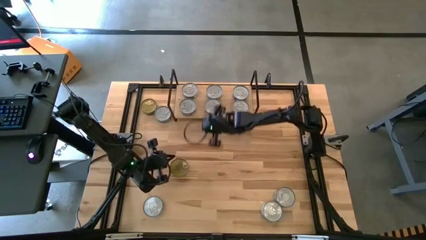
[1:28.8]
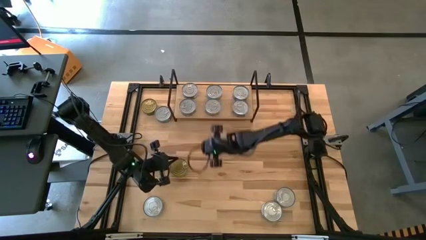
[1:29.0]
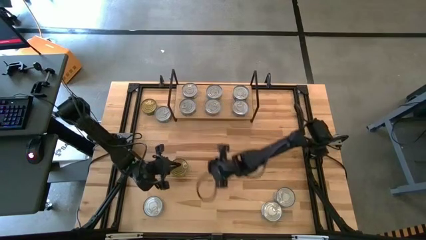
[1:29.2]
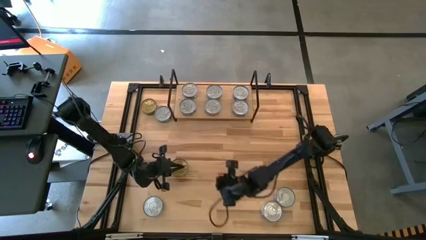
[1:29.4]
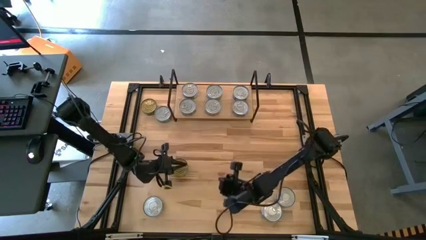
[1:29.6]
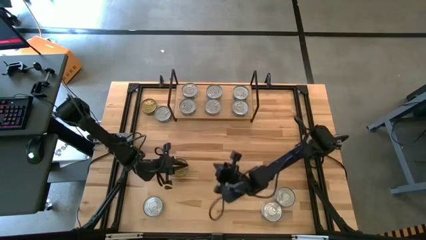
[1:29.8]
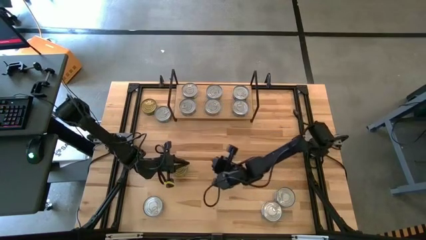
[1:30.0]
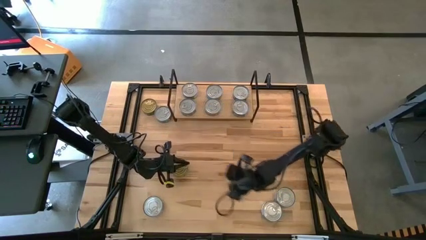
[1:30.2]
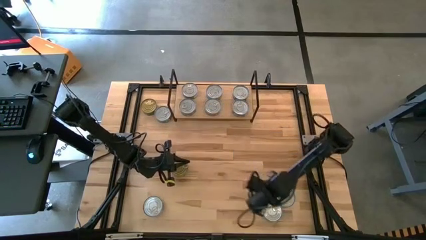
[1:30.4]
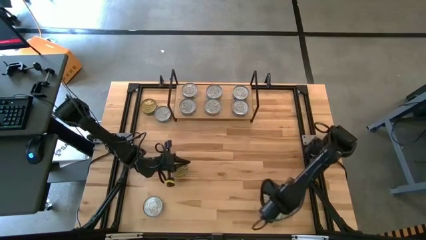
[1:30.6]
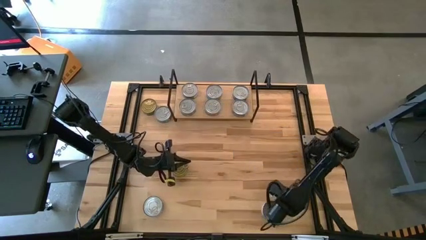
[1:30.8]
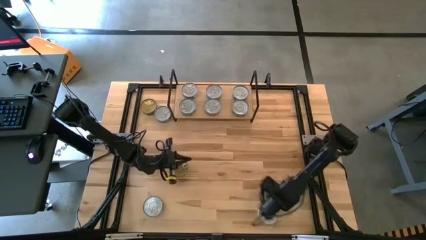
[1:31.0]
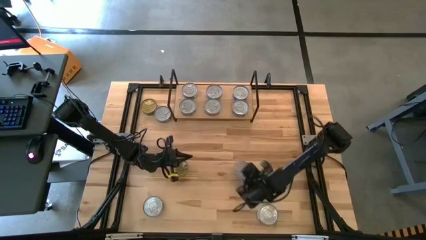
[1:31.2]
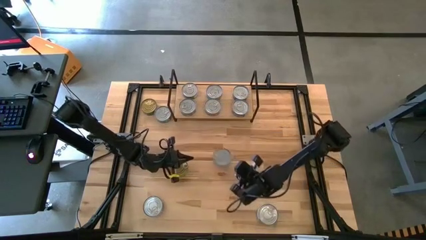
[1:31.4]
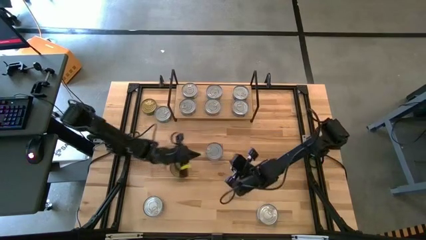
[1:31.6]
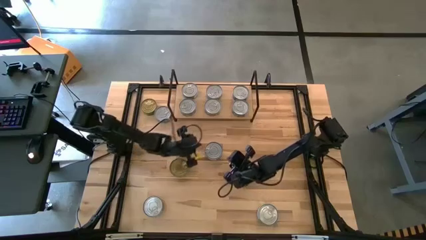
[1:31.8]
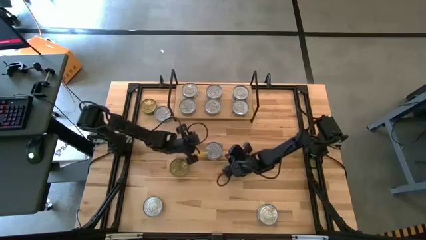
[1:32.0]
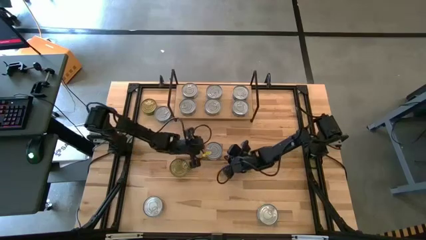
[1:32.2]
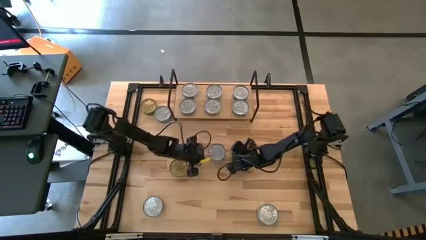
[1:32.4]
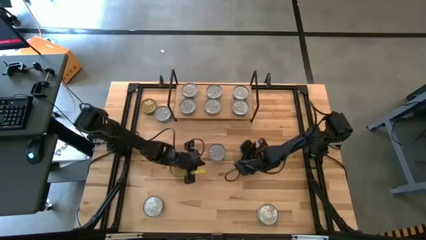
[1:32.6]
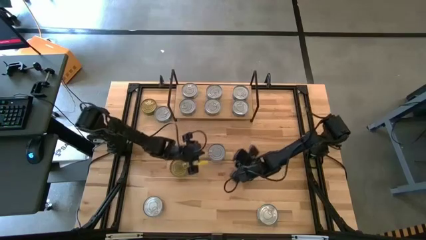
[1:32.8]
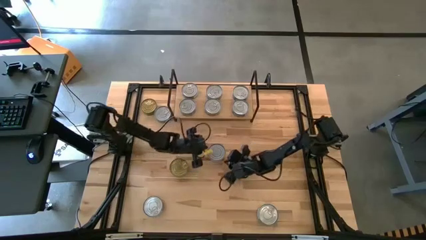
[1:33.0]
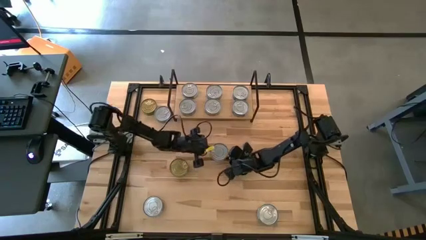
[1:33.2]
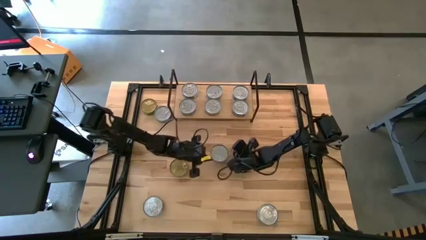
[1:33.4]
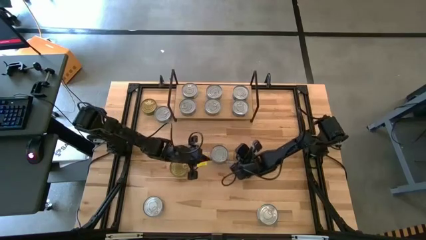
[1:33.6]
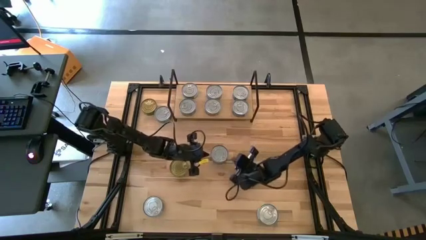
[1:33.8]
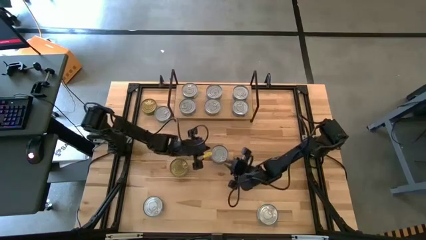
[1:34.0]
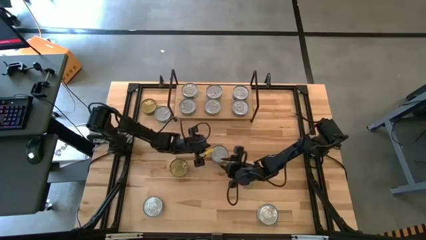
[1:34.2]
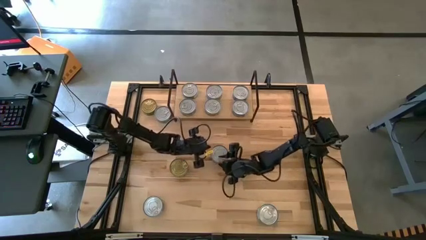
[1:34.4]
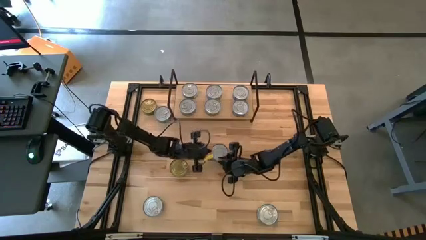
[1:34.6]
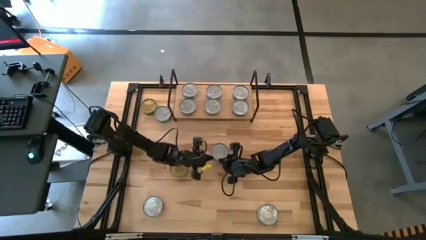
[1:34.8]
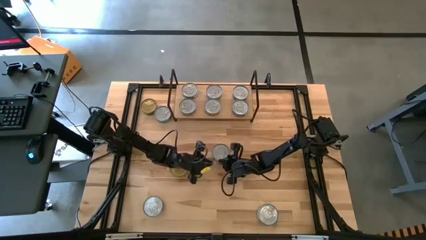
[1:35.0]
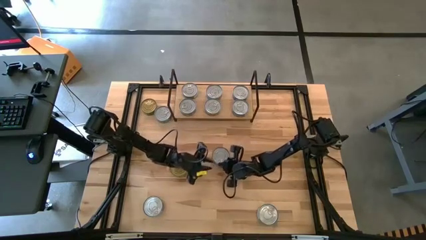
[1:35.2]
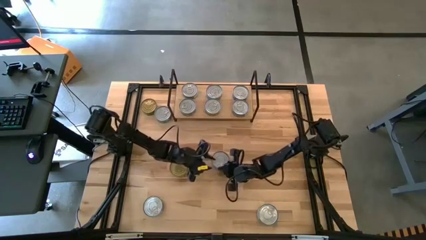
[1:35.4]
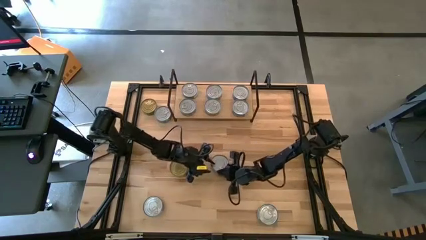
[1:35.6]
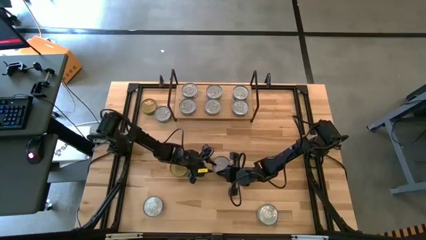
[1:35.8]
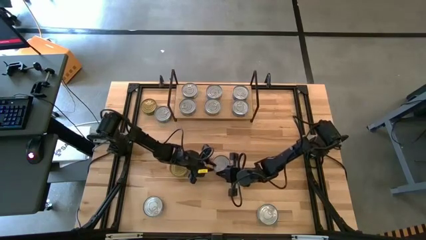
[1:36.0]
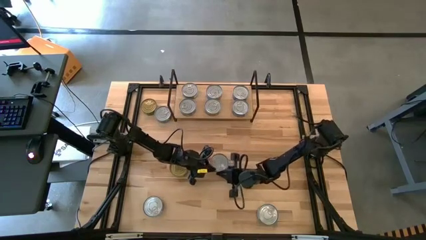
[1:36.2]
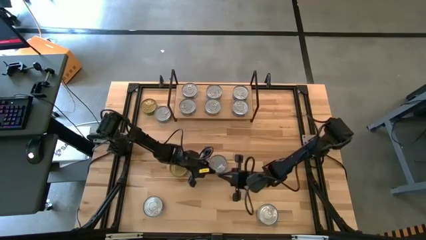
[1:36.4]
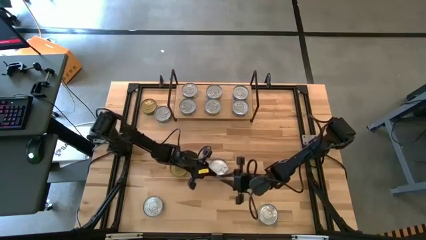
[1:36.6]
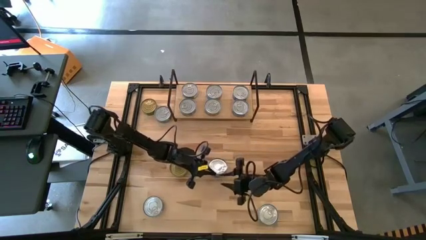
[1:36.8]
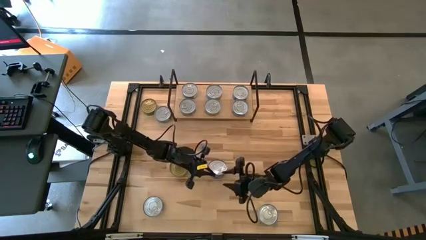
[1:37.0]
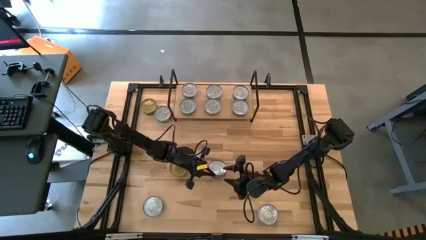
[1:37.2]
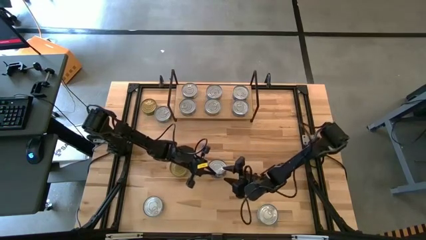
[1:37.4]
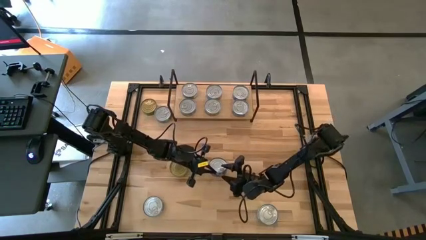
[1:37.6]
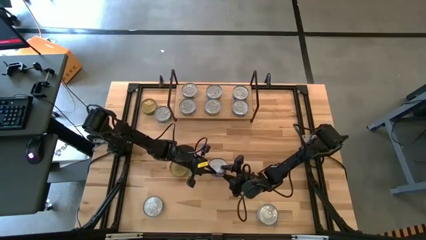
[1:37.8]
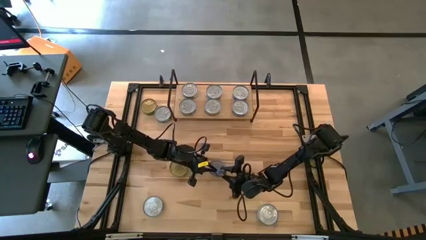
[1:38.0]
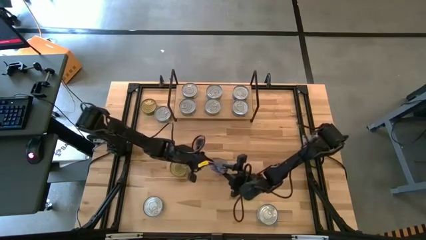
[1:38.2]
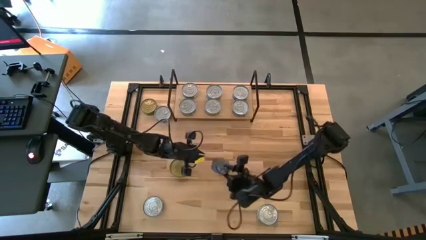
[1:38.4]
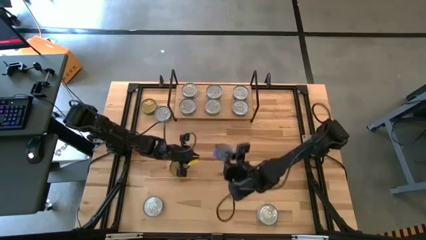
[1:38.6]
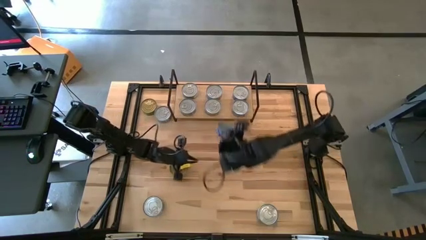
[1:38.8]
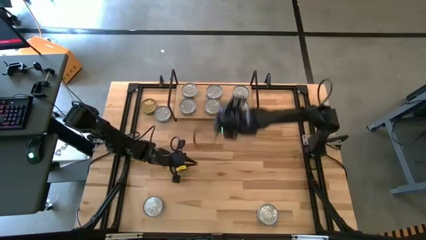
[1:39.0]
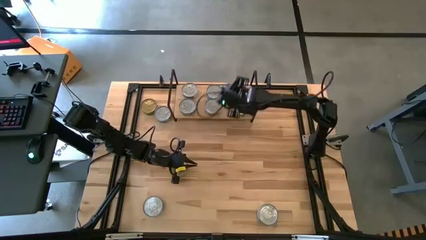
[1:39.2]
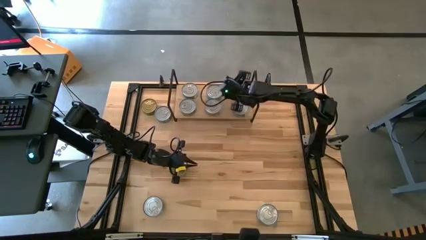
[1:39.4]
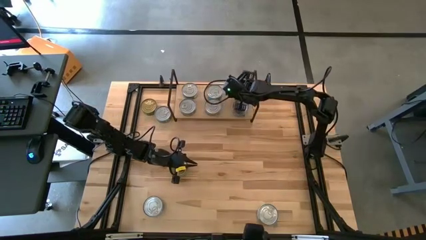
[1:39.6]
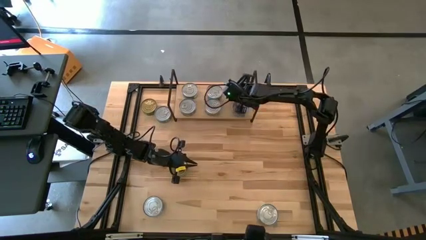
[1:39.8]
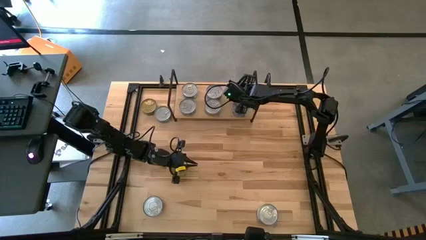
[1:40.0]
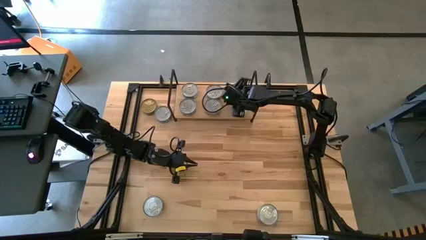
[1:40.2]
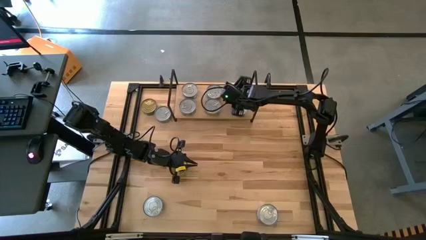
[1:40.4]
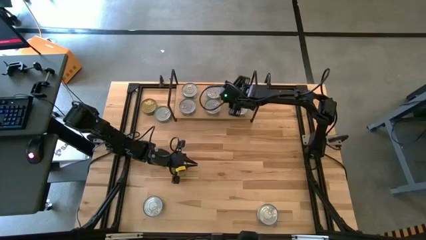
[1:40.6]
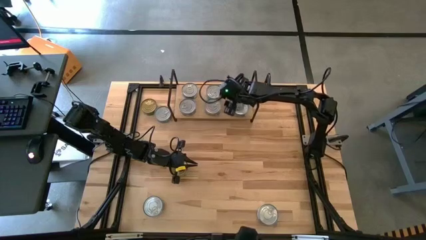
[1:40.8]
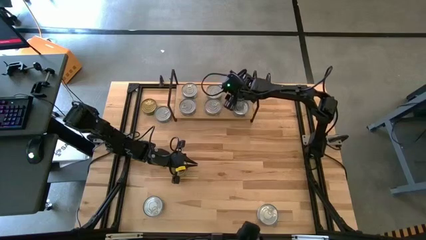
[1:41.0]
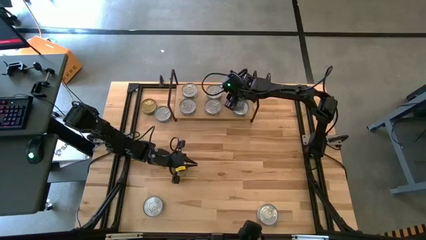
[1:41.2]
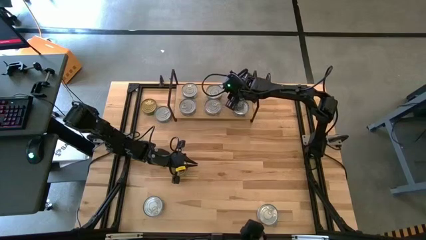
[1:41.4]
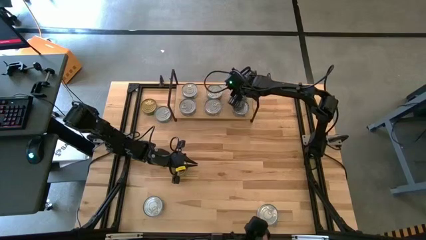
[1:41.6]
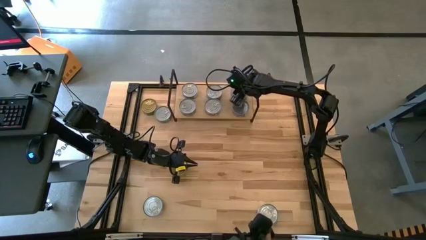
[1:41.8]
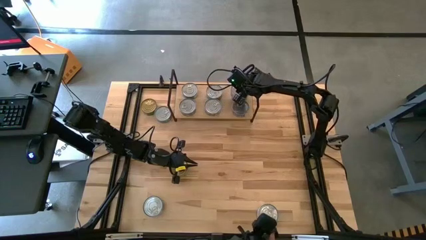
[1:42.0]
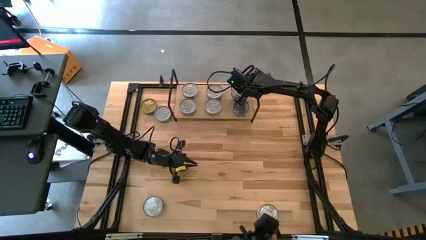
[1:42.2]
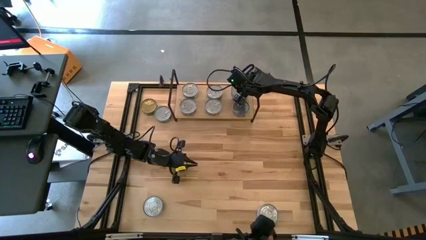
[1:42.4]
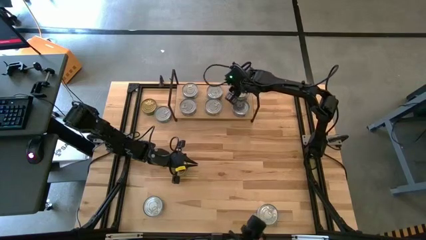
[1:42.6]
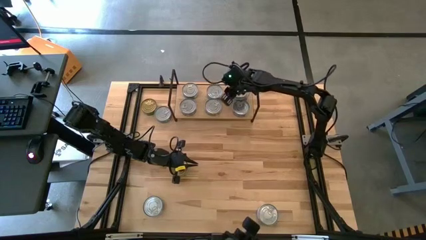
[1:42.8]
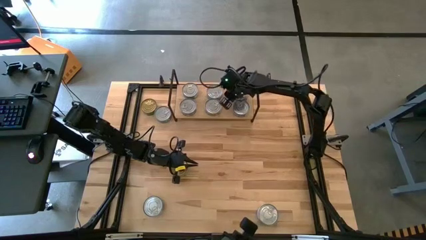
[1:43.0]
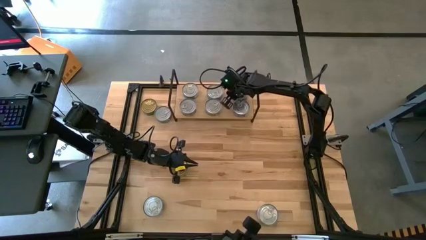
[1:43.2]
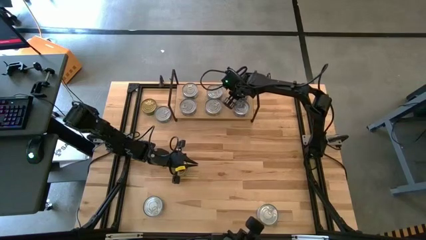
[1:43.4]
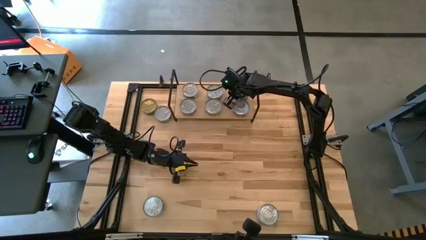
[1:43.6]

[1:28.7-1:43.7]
Task: Stack canned seafood by type on shelf
Stack the blue tuna can on top of the blue tuna can on the shelf
